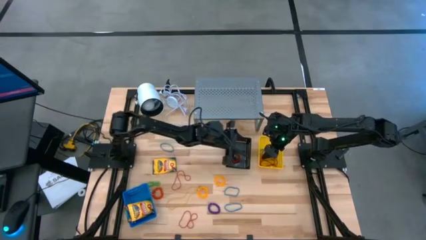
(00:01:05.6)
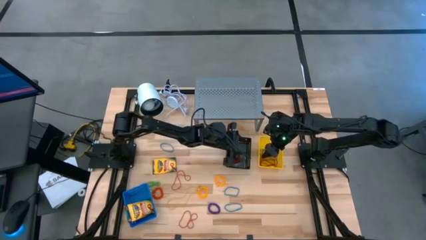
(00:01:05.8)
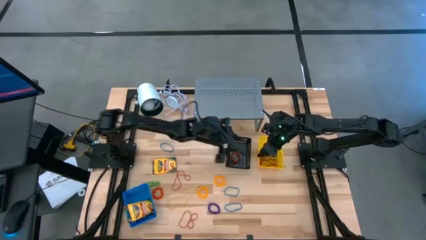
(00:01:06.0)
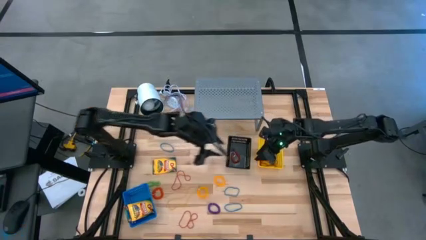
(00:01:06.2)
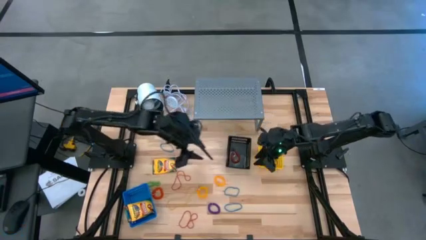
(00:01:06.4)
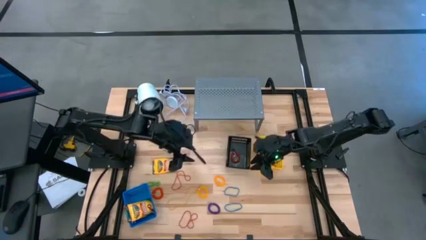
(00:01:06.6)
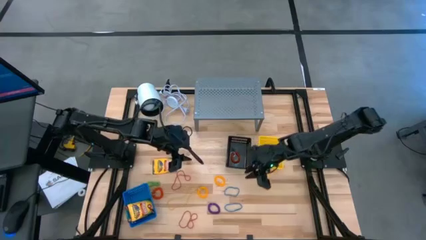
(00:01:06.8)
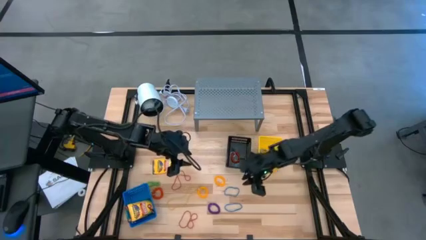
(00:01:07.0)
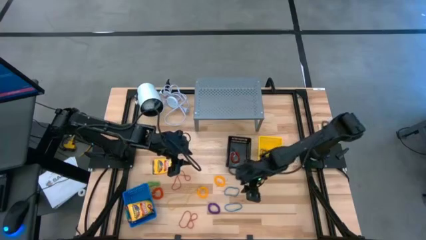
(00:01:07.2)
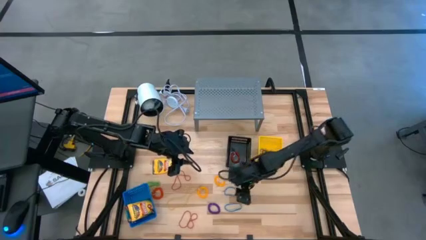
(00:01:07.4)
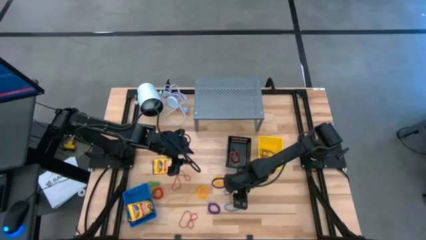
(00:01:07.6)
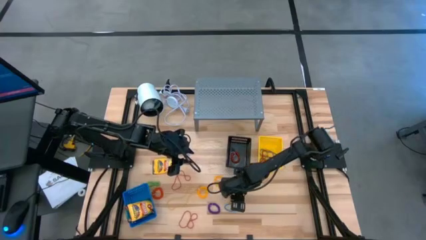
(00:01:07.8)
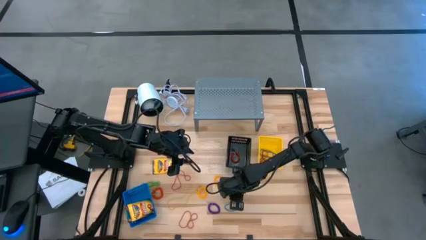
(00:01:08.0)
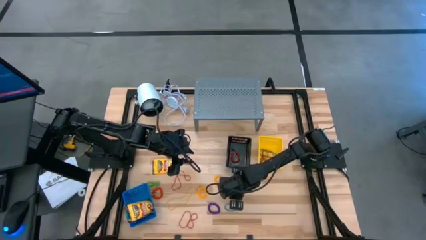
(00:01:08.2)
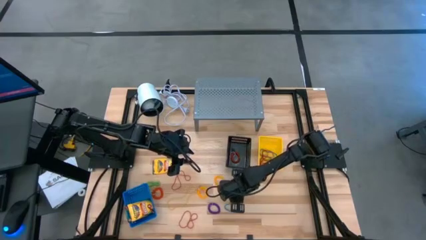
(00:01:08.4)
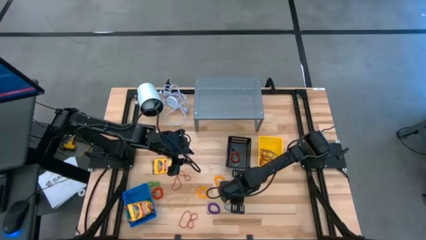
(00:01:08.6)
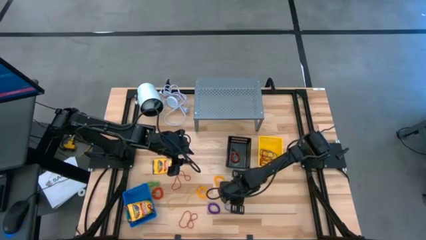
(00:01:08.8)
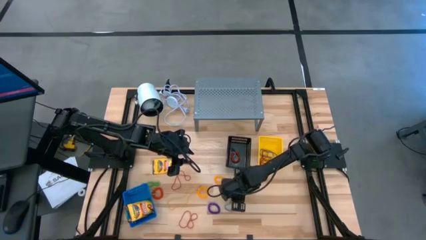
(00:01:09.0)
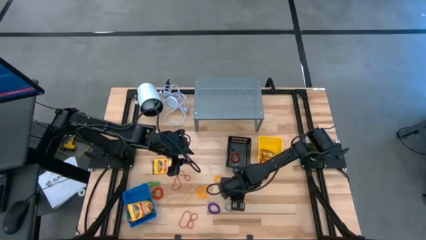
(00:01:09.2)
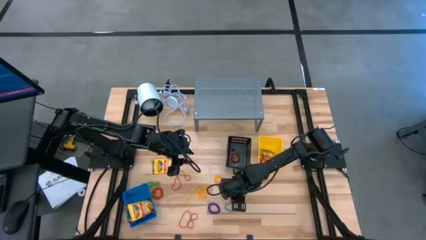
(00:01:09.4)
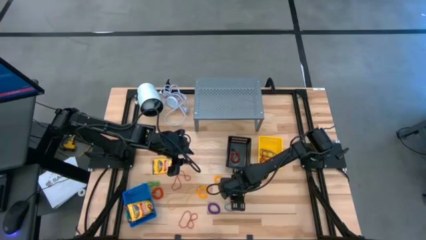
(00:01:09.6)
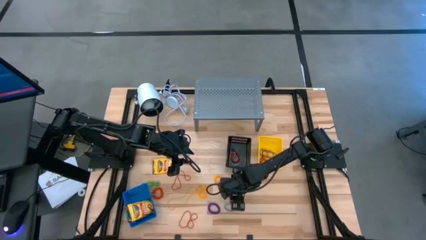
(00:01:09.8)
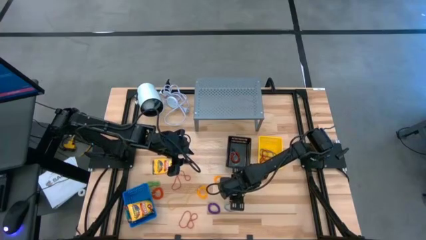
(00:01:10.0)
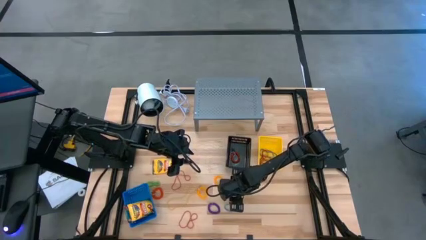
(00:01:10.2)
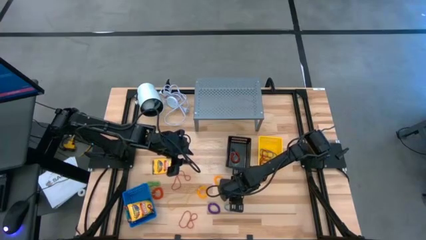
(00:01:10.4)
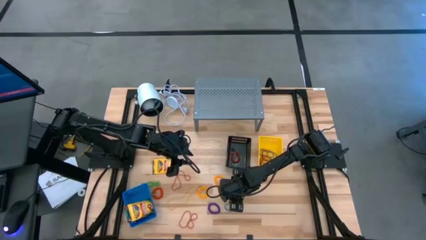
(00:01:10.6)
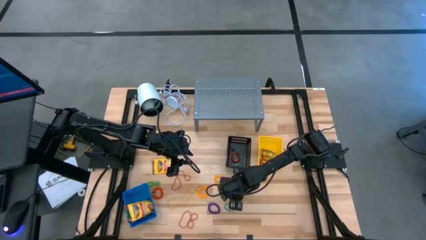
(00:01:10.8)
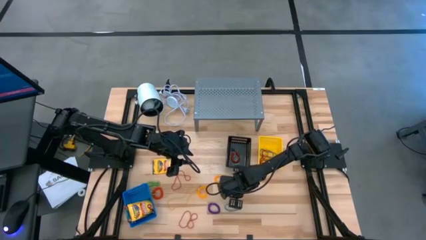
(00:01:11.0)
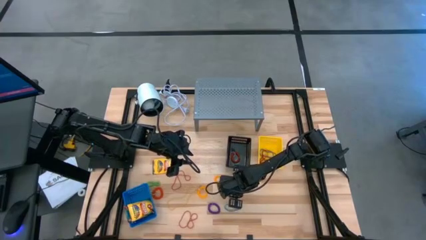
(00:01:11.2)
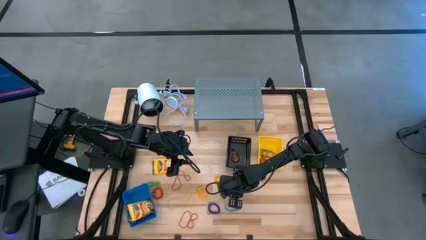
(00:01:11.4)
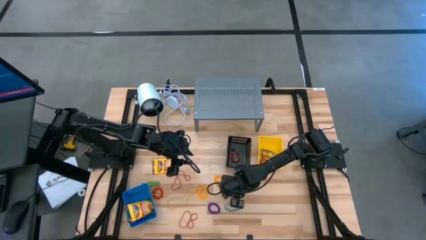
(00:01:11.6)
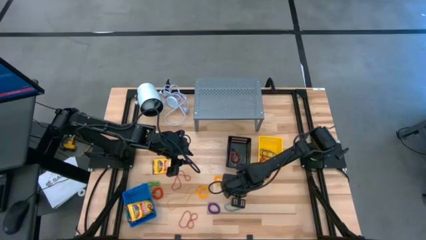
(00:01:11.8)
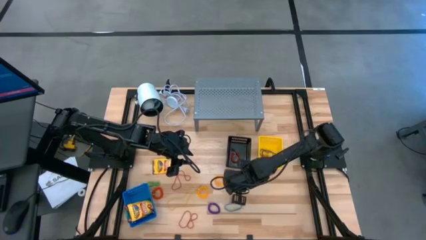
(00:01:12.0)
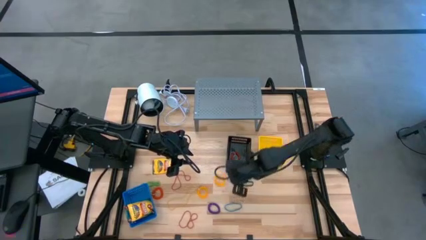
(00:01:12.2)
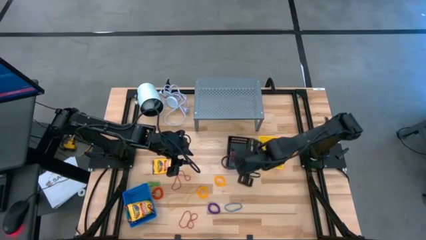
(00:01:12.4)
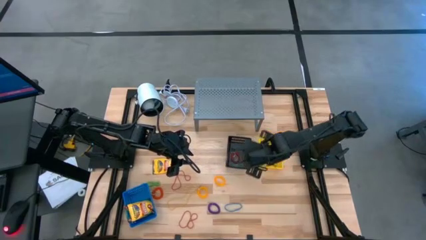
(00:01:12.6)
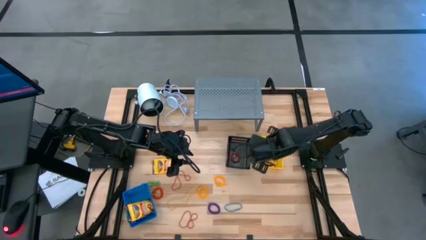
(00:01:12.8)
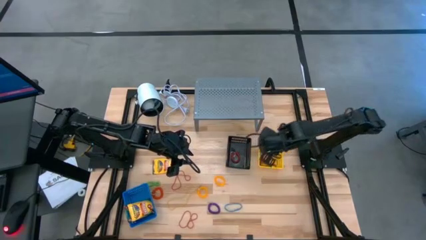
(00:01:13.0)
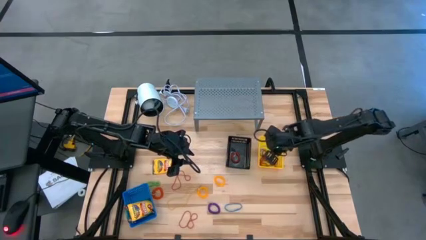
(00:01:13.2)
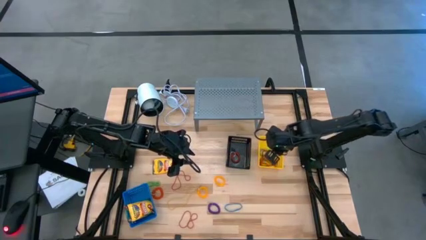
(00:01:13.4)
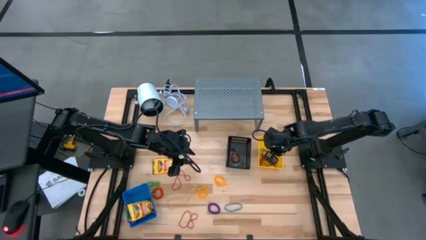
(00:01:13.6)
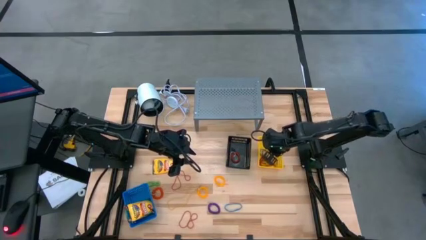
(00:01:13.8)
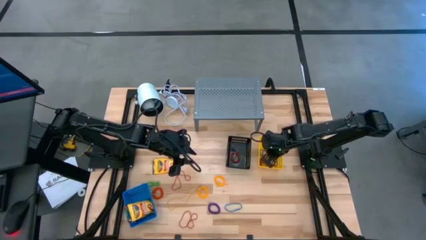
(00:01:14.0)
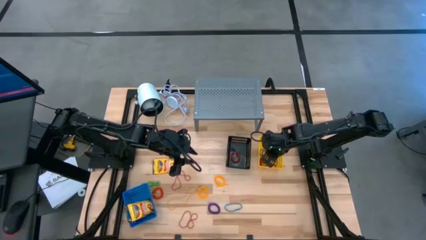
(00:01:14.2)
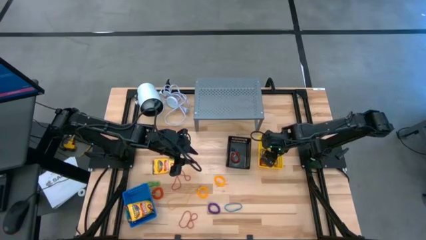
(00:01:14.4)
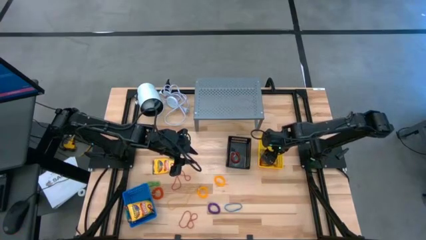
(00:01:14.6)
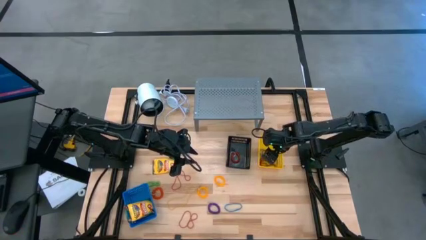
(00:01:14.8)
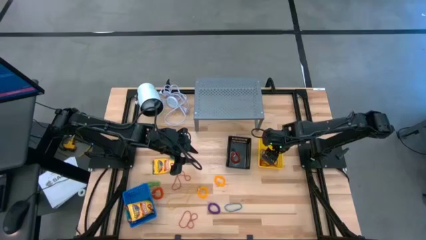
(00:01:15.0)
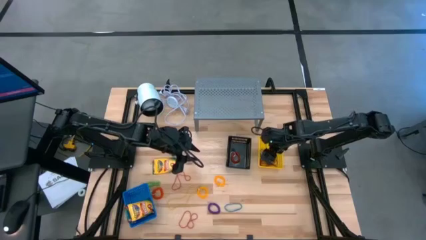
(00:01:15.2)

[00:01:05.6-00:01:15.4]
Task: Pick & Place Office Desk Supplies
Put the blue rubber band into the yellow basket

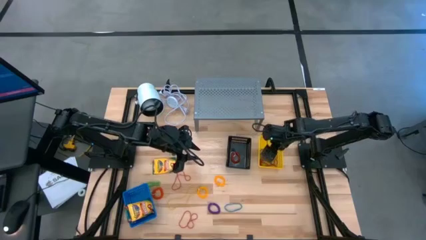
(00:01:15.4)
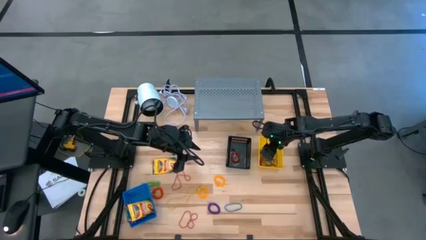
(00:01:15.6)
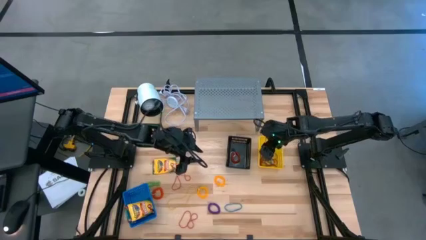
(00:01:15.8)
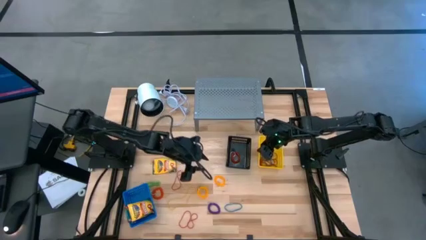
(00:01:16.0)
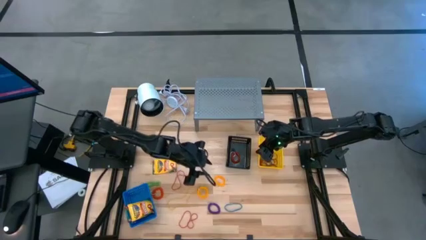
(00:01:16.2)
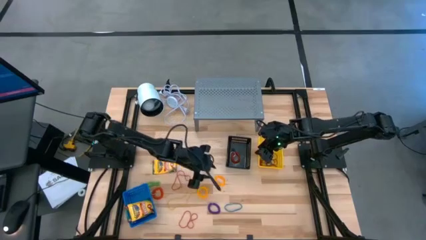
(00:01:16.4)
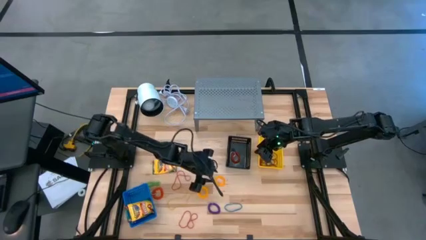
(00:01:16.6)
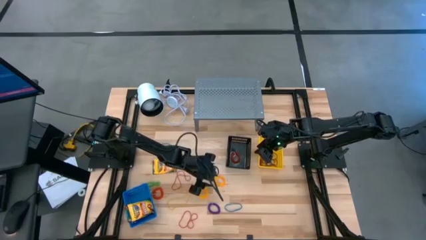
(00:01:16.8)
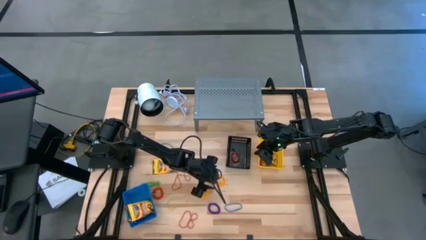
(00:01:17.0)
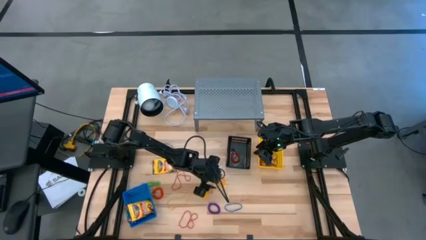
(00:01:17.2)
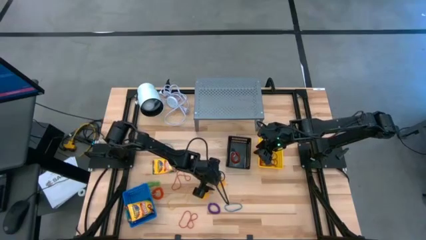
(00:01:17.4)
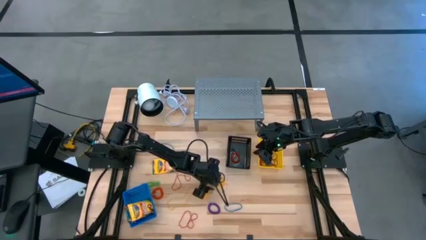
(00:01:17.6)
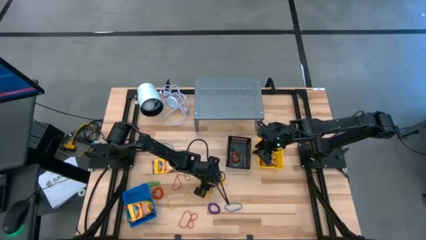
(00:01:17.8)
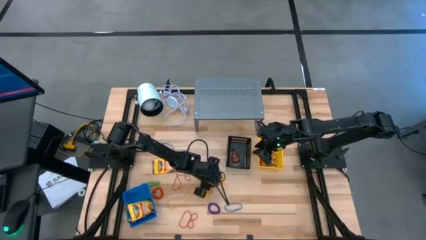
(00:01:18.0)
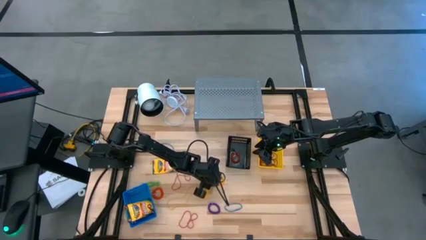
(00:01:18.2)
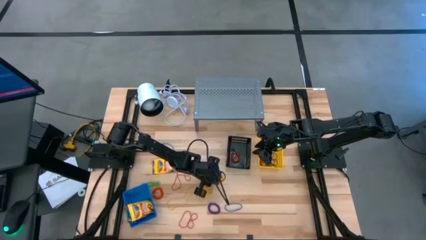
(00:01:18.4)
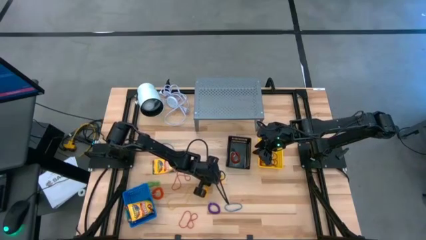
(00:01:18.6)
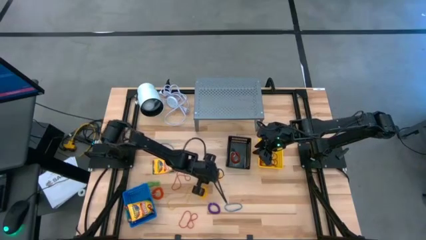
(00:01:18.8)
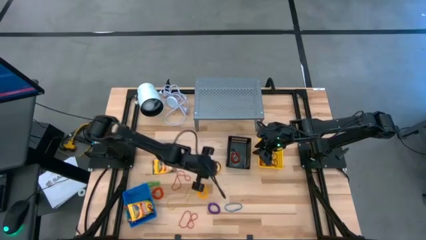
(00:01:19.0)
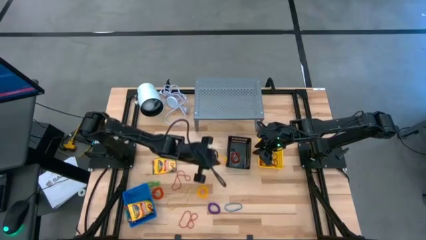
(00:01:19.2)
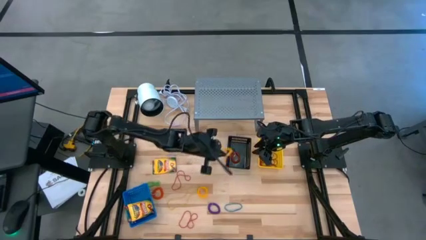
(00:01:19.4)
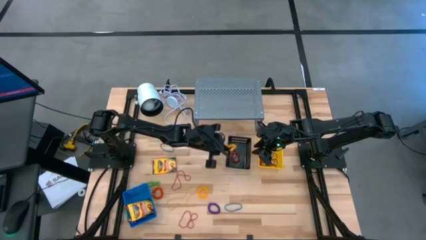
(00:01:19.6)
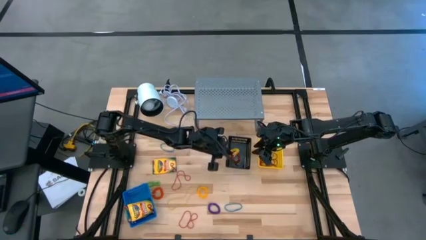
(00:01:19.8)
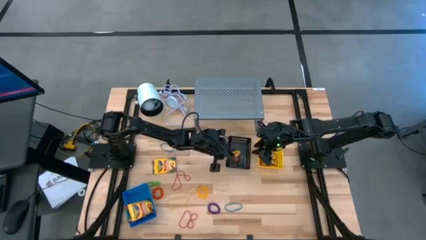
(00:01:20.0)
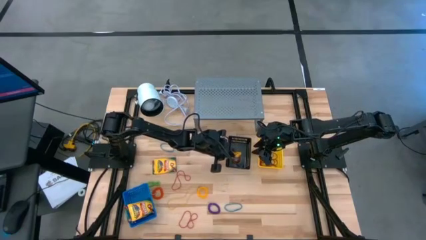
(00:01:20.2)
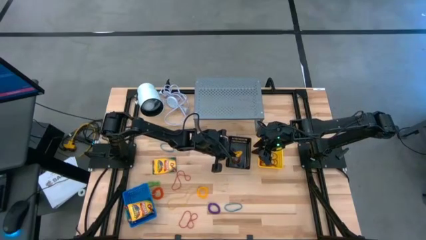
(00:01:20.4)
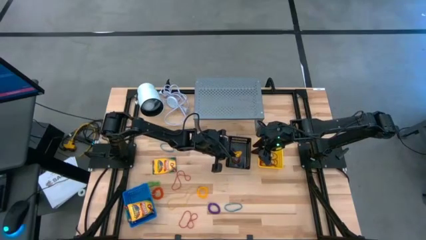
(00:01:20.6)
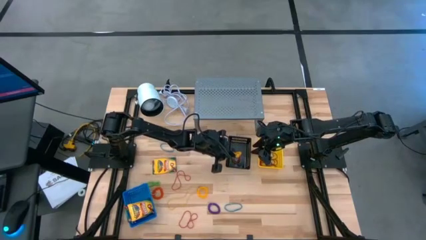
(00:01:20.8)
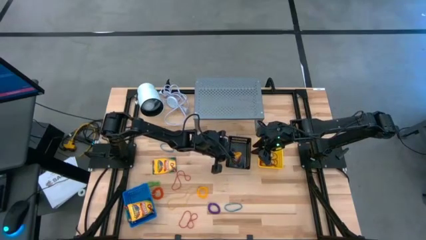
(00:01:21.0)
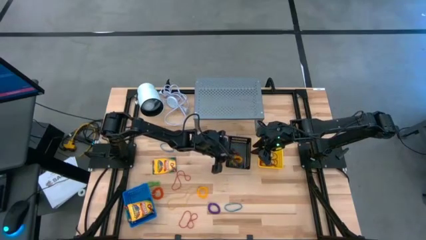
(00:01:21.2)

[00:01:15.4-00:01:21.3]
Put the yellow spring keychain into the black basket
